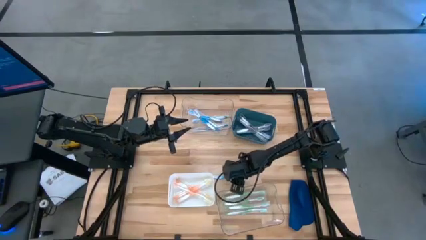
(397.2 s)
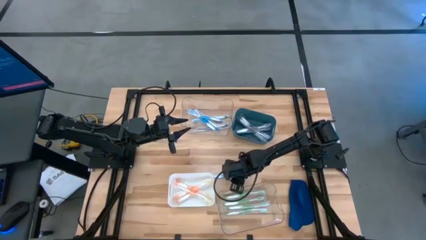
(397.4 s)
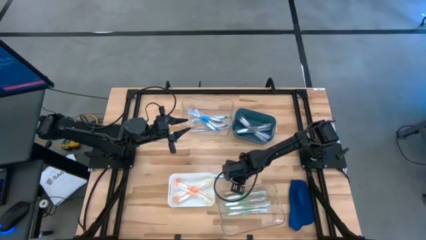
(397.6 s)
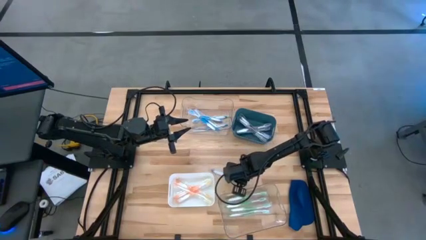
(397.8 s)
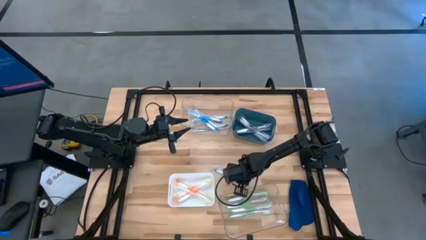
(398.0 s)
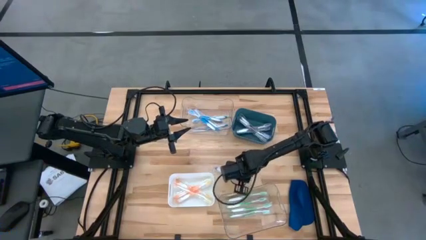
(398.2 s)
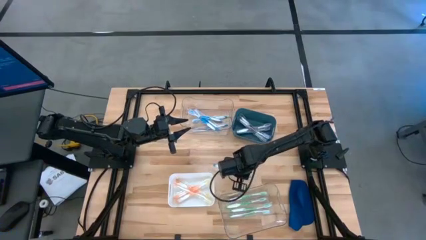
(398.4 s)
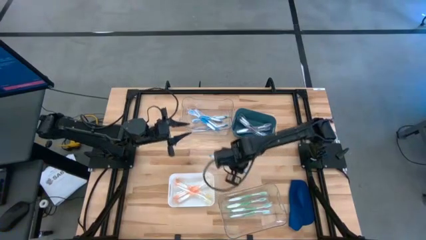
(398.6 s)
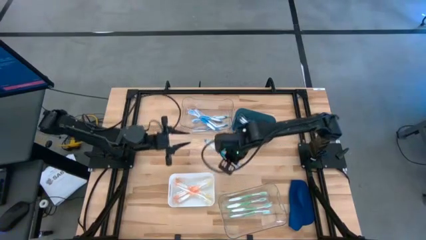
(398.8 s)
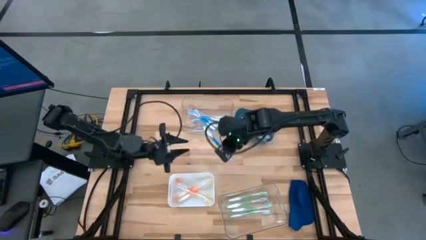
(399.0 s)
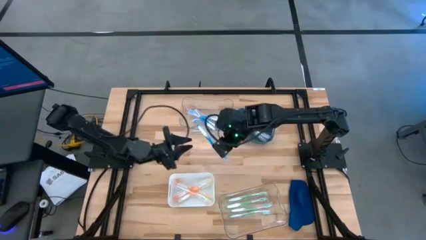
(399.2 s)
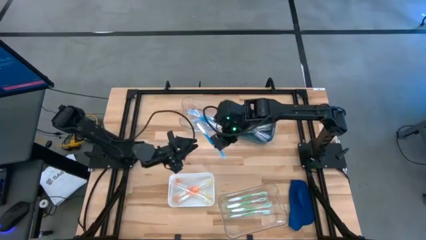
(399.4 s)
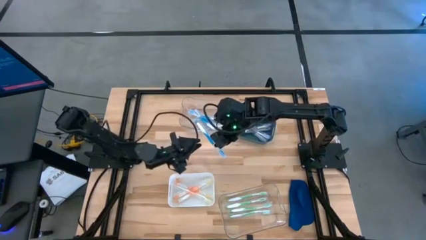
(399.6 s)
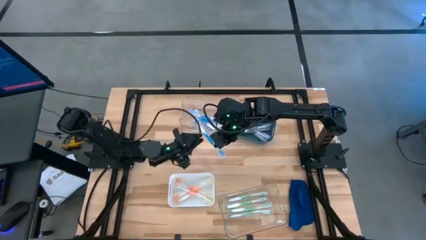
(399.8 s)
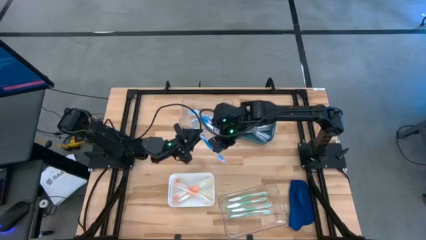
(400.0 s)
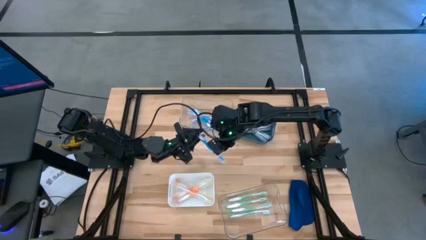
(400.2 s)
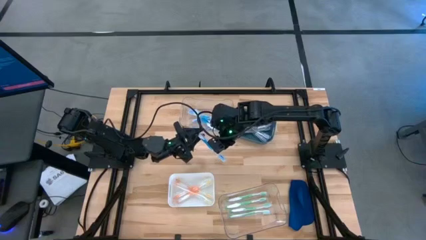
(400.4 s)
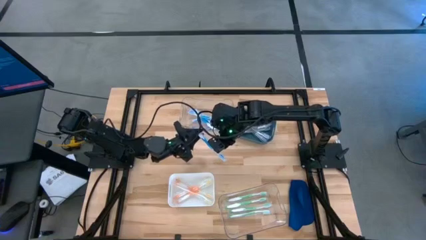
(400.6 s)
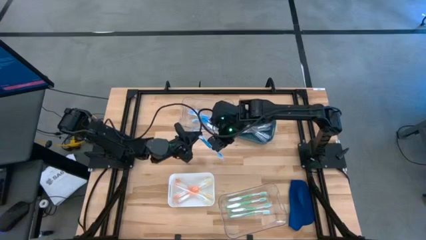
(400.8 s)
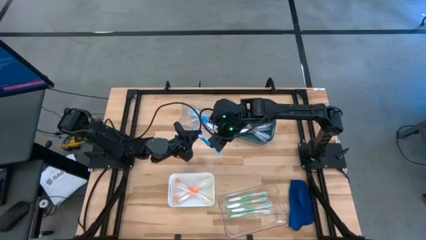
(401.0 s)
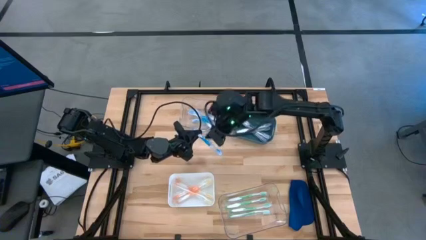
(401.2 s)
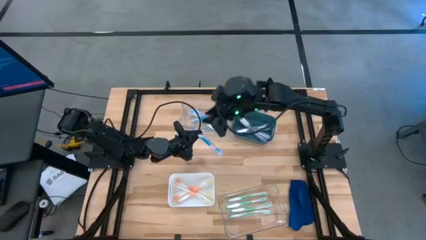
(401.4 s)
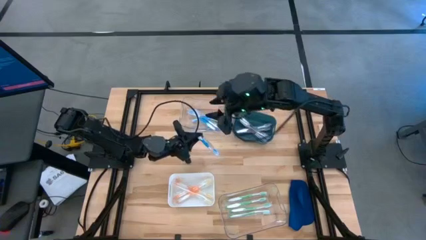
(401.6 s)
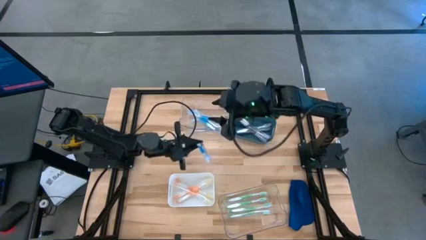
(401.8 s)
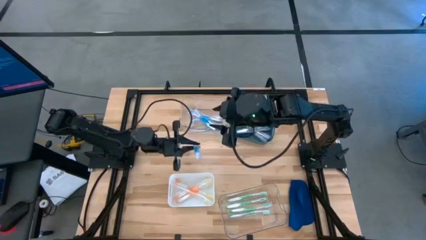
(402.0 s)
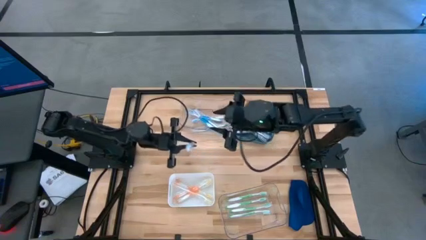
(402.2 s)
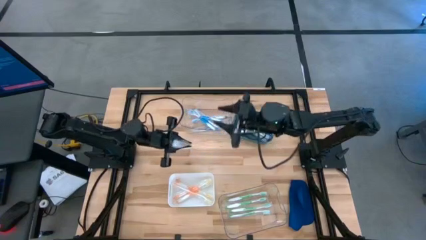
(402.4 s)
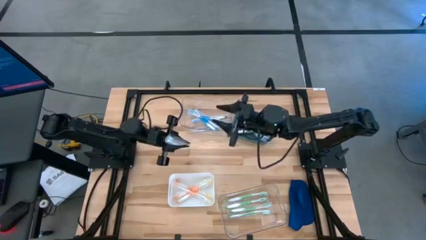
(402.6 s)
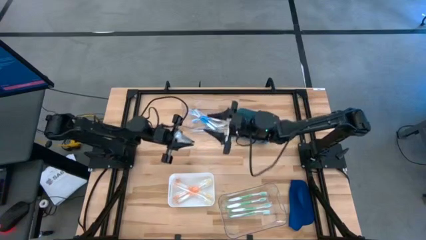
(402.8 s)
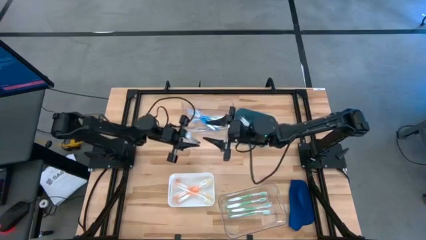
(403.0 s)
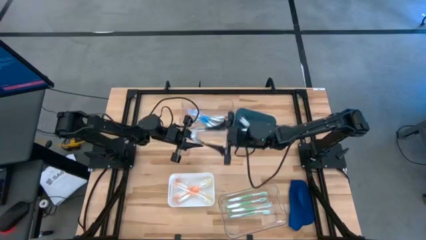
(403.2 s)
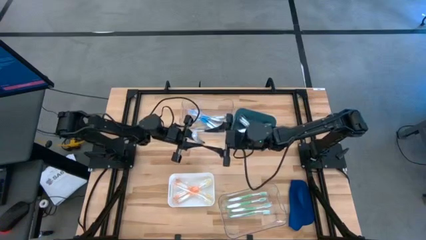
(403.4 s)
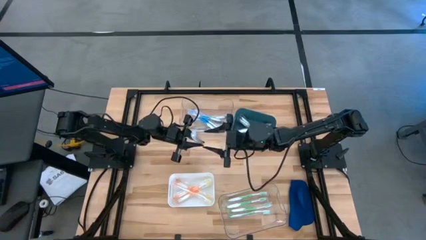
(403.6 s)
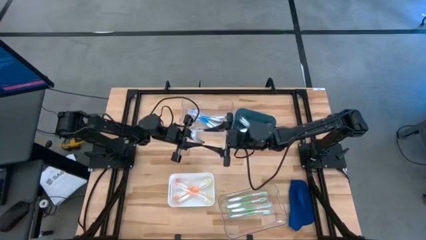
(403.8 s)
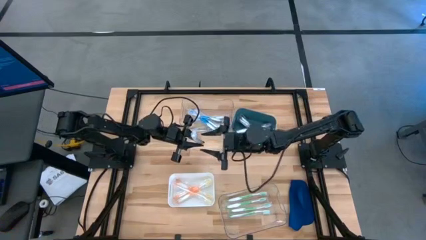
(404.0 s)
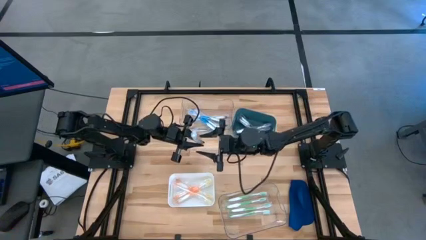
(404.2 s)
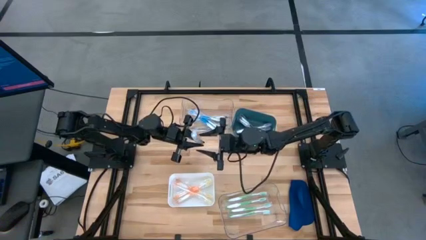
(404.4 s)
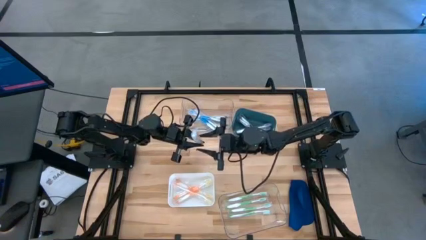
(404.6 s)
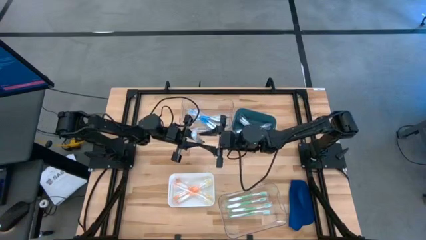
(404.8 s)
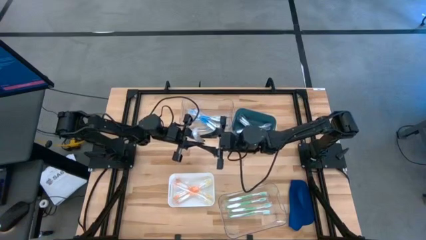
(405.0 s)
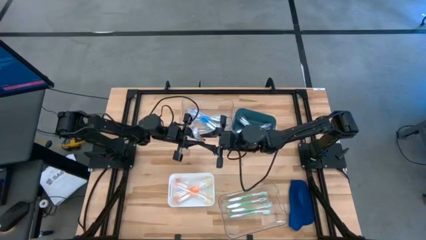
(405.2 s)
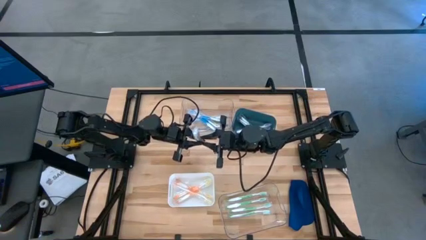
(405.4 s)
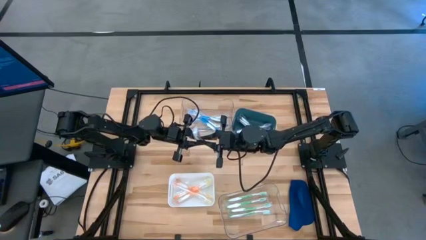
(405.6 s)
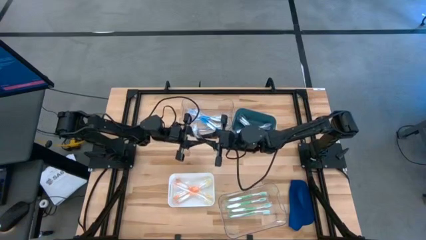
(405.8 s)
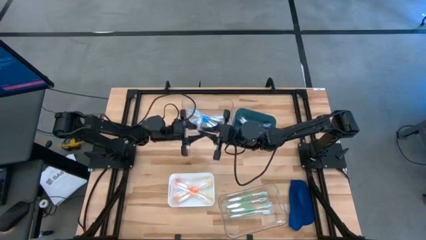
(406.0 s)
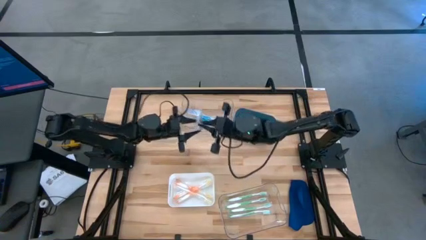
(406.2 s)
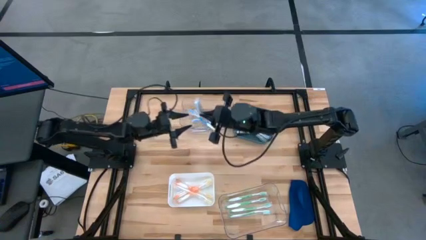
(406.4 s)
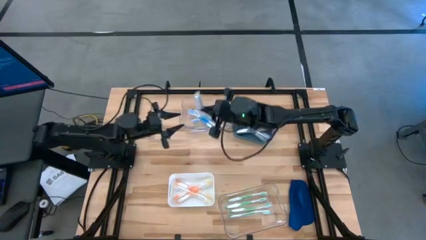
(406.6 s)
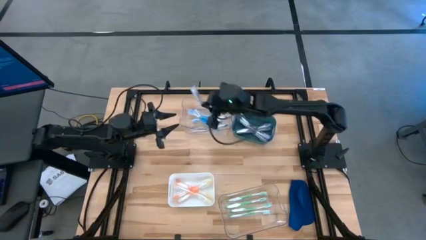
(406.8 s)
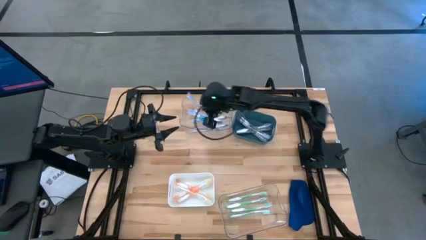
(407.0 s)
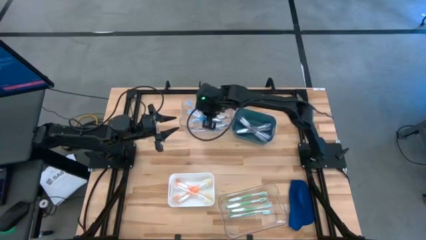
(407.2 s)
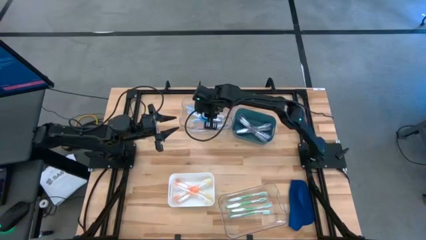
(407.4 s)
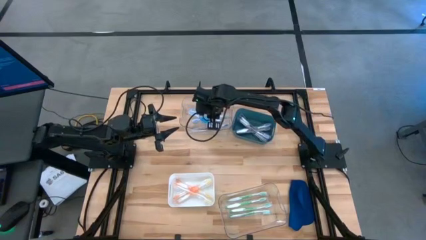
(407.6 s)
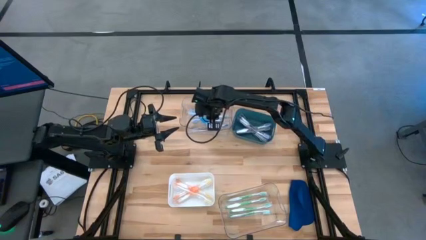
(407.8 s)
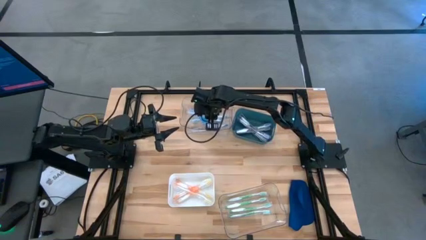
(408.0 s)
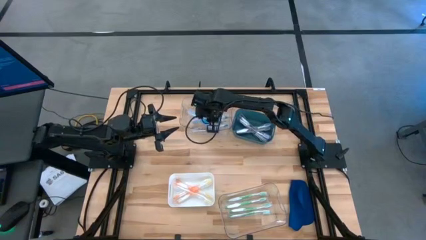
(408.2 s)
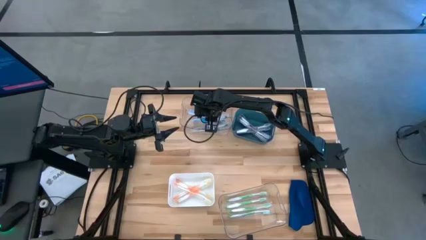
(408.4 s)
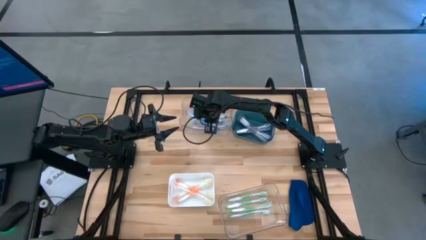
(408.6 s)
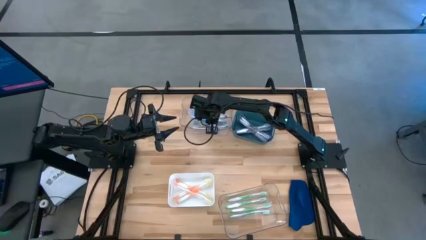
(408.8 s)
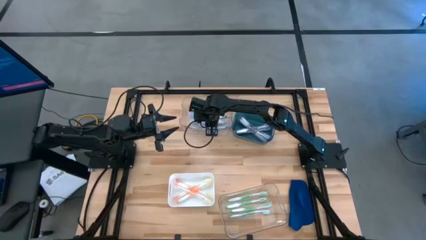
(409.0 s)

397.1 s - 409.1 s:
Task: Pick & Place Toothbrushes
Put the blue toothbrush into the top transparent bin

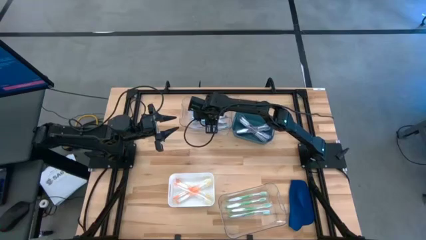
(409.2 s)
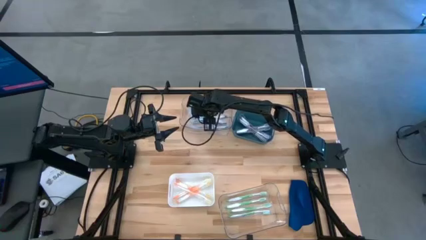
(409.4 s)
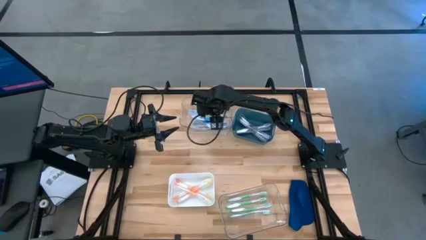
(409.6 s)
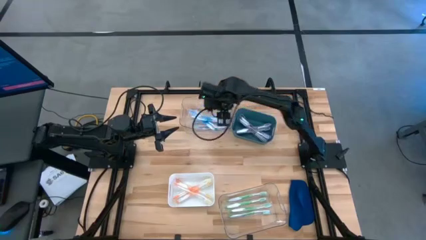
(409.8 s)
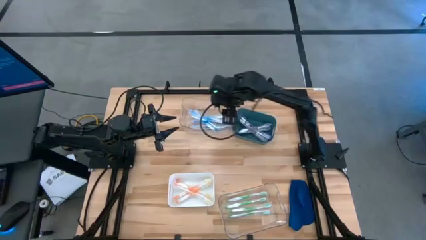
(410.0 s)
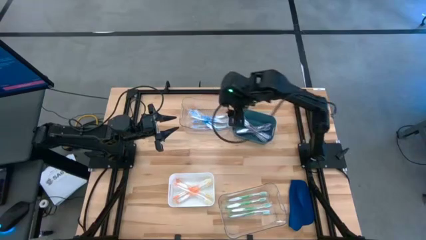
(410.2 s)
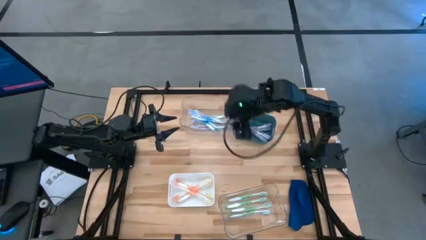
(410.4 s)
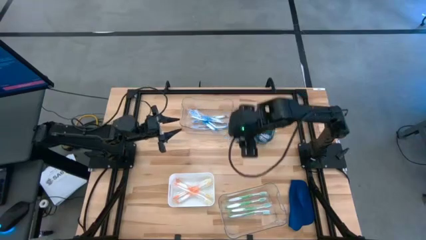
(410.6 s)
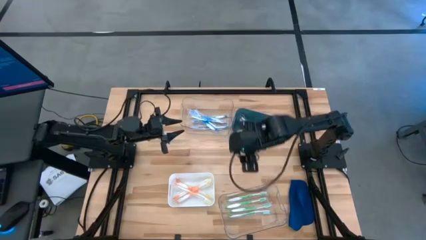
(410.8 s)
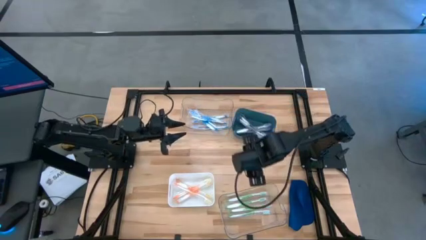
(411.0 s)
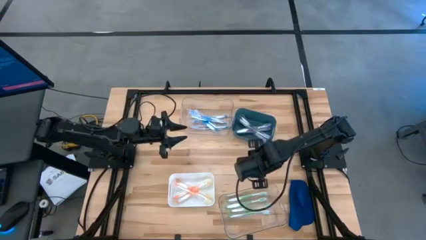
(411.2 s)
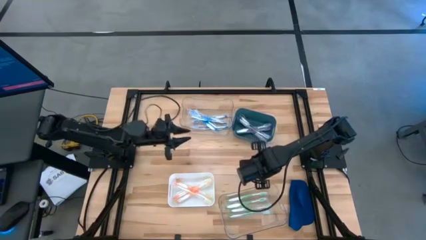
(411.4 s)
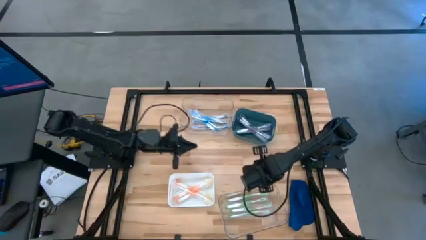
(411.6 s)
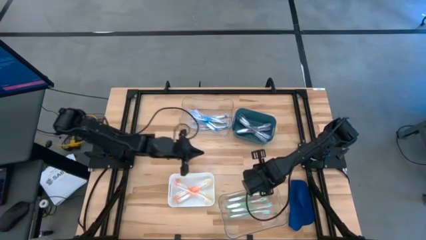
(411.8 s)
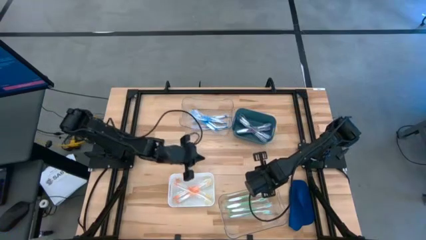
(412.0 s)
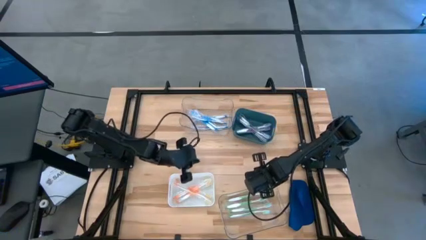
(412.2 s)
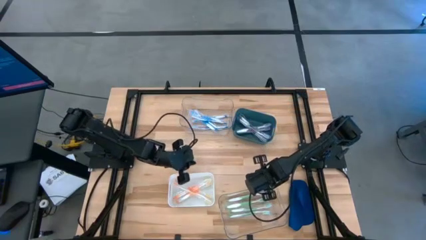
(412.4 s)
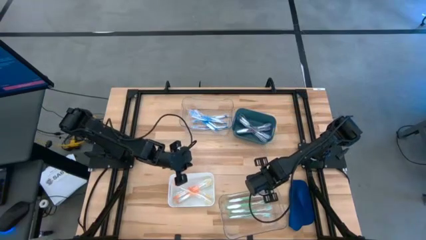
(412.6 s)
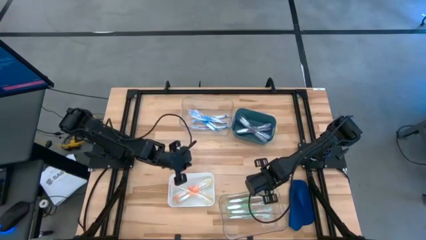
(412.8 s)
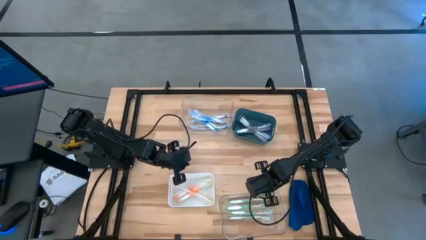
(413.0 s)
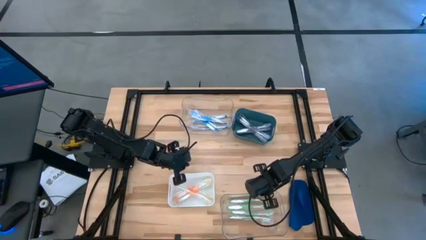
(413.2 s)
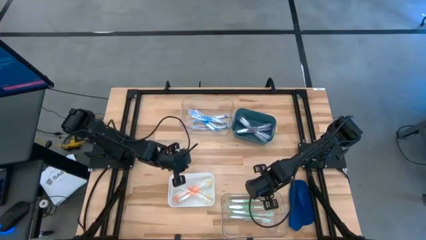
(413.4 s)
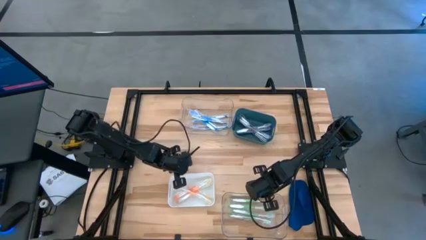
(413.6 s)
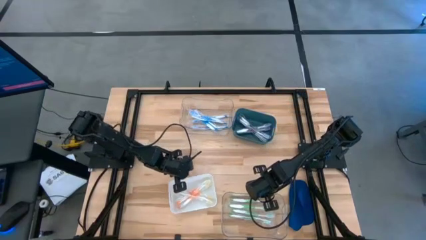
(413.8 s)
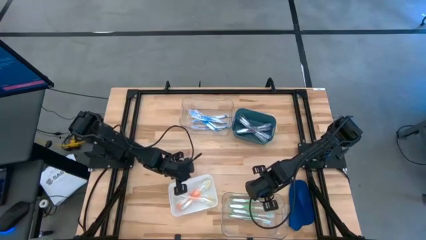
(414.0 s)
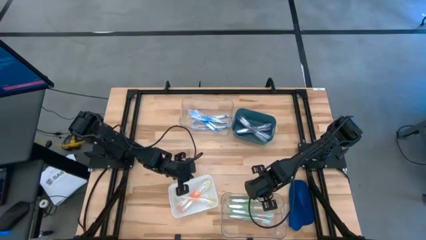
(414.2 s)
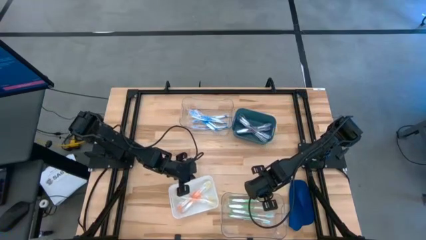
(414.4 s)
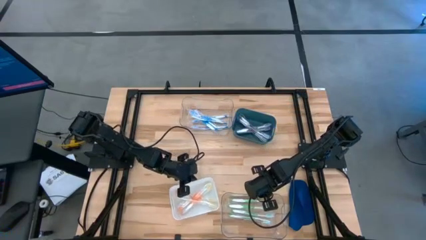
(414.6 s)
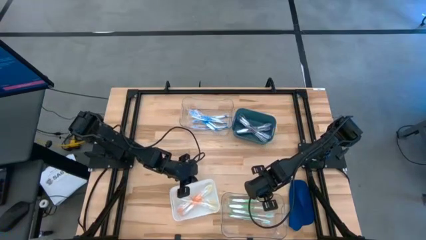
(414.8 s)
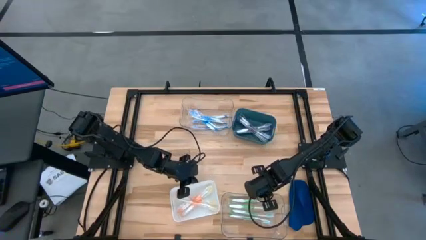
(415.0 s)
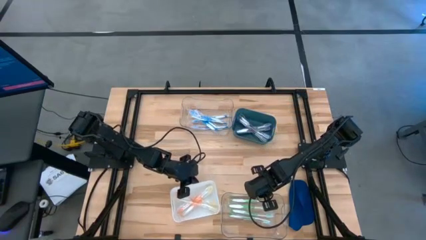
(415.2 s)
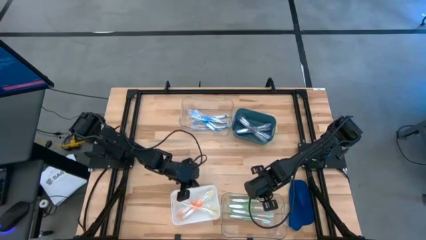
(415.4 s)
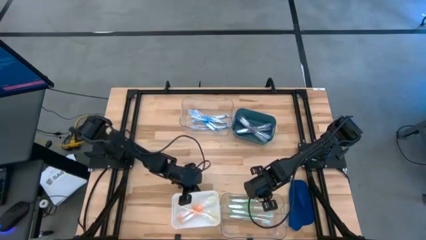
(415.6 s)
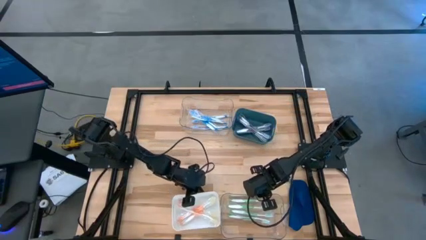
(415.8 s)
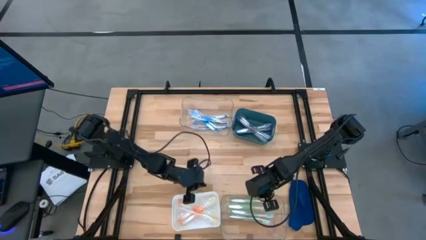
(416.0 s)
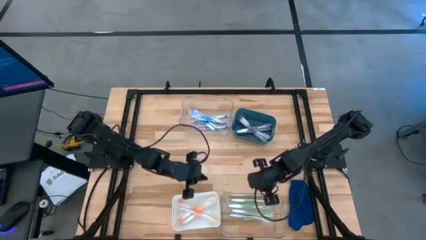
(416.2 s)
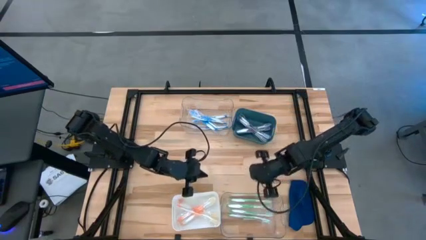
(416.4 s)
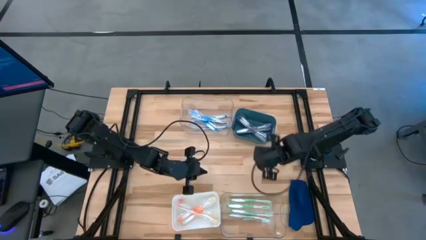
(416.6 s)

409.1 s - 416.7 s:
Adjust the bins
